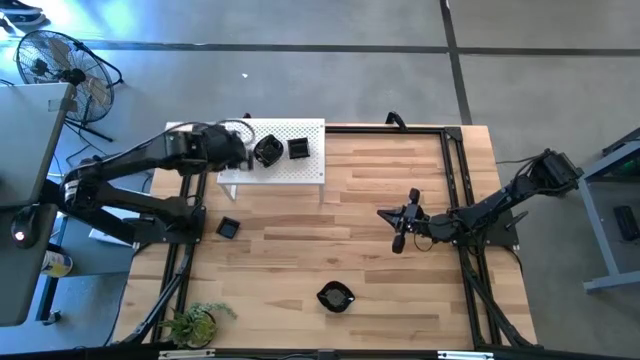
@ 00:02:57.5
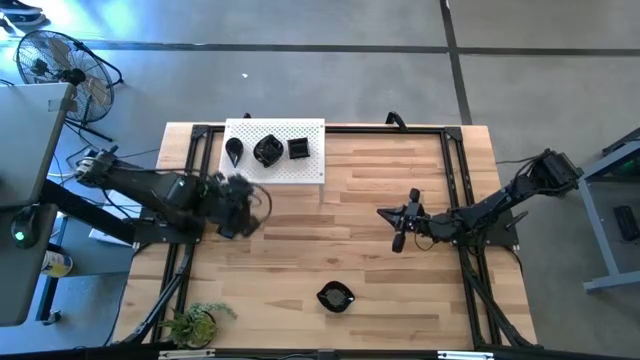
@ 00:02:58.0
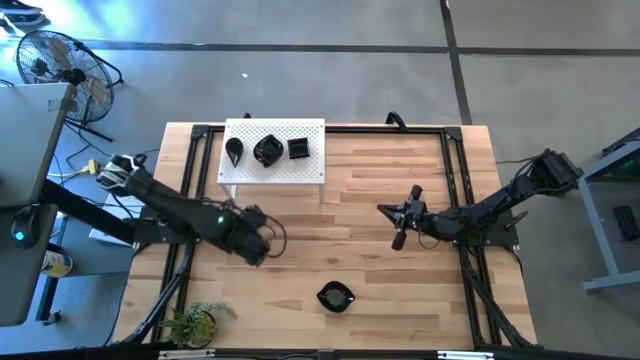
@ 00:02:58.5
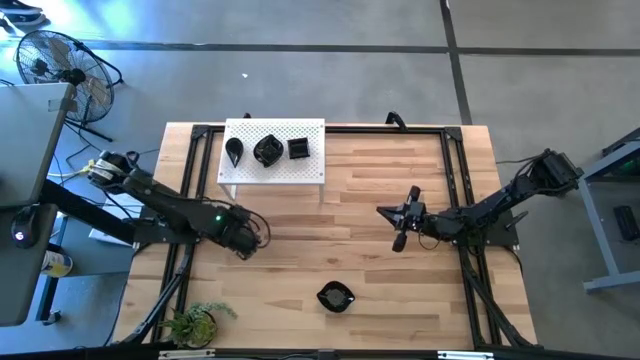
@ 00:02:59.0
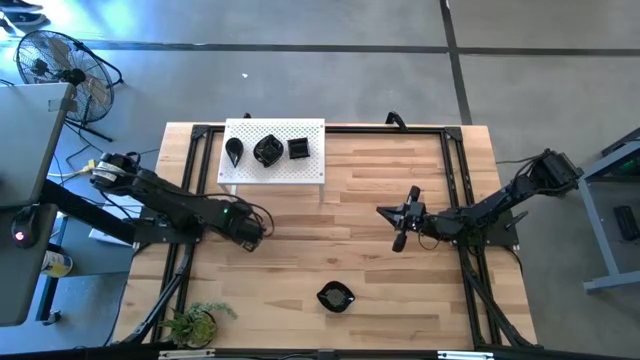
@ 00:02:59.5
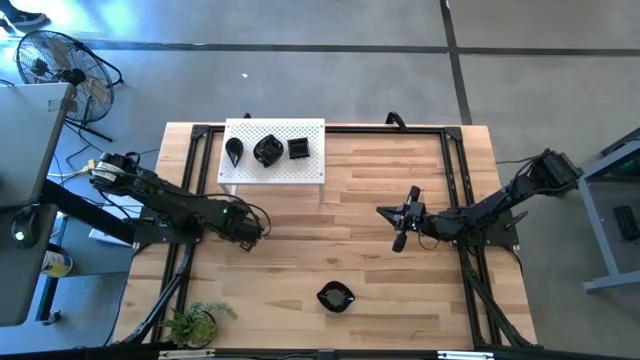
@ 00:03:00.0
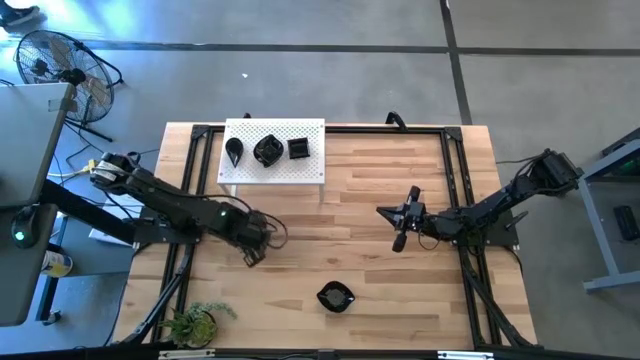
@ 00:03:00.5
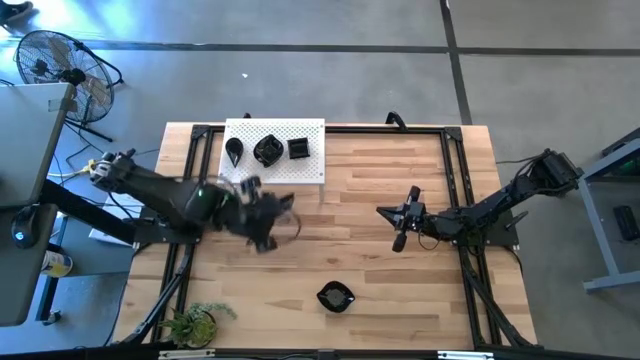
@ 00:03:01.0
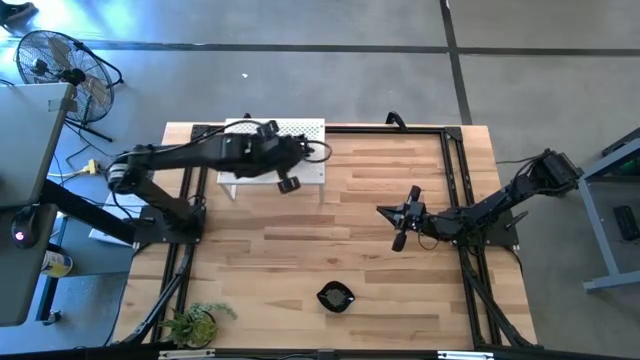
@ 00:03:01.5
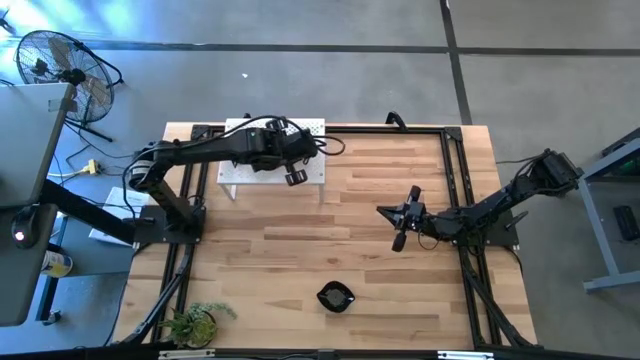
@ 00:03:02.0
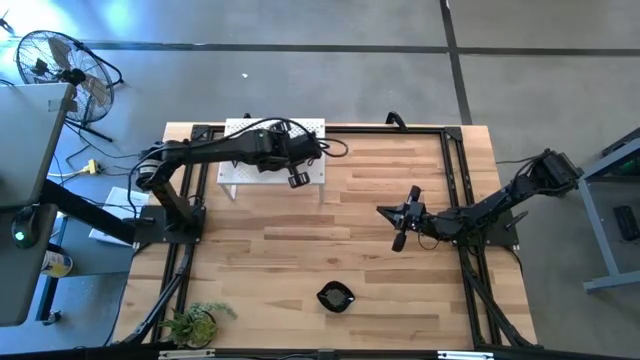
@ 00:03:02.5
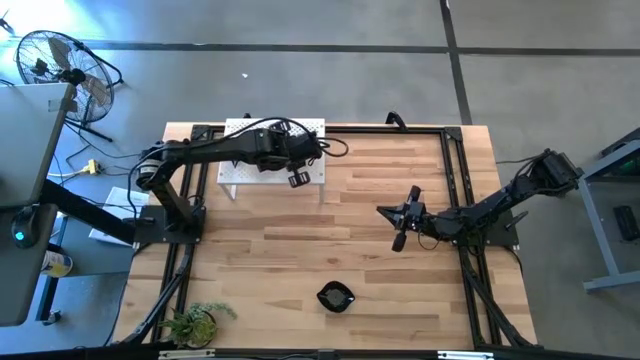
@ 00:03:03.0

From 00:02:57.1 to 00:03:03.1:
Task: Pick & Place Mini shaped plates
Stack the square plate on top of the square plate on the shelf

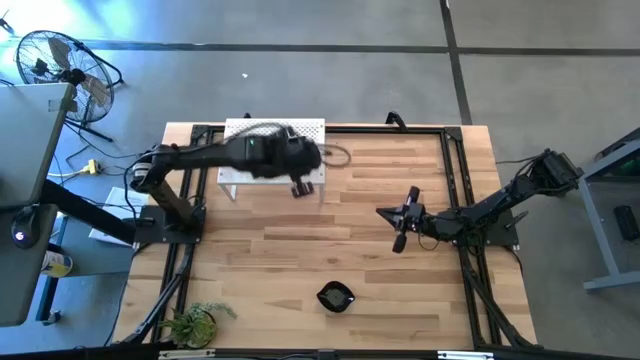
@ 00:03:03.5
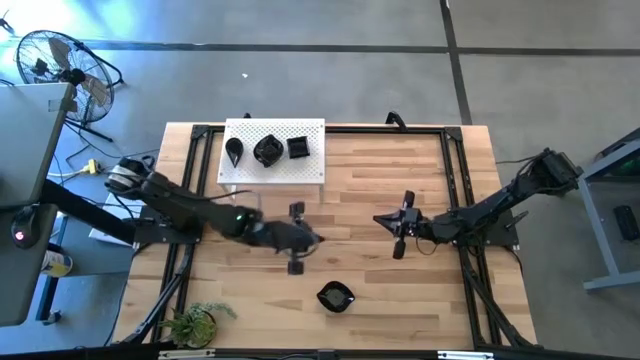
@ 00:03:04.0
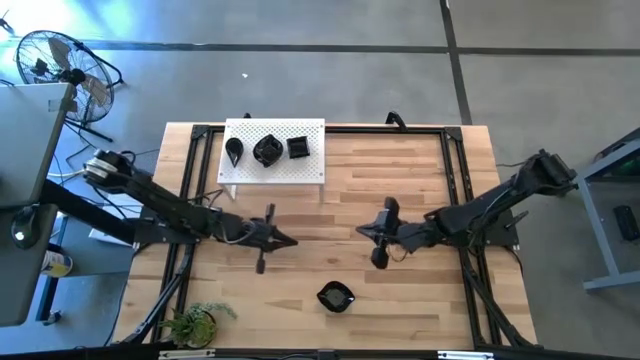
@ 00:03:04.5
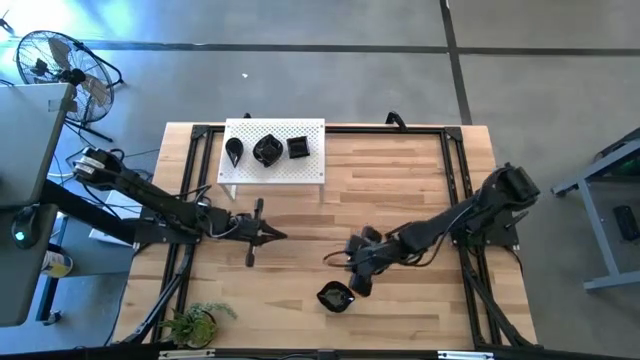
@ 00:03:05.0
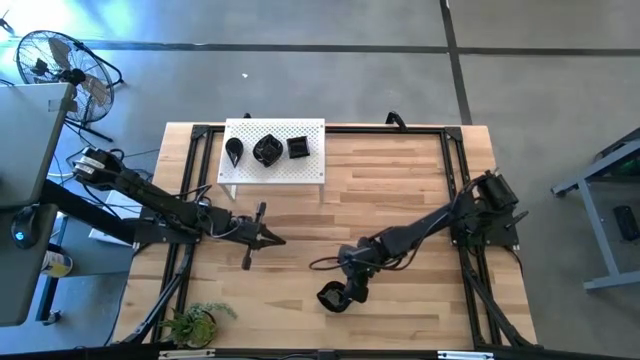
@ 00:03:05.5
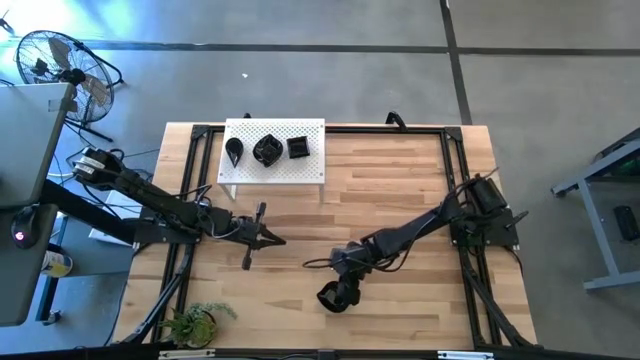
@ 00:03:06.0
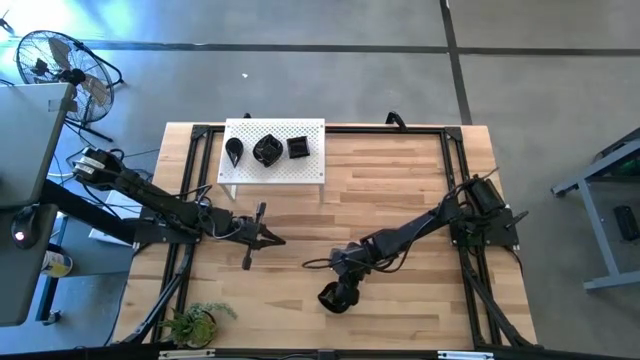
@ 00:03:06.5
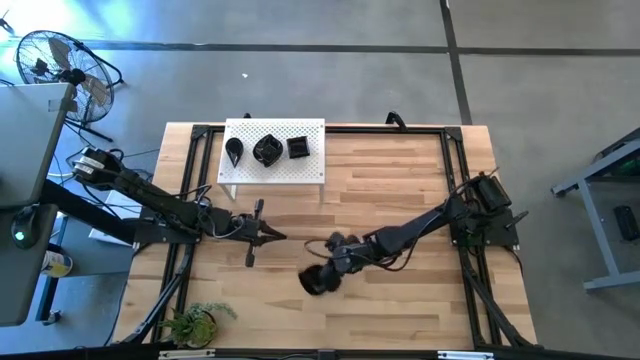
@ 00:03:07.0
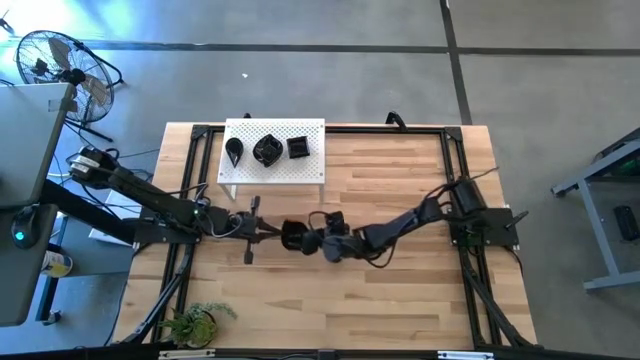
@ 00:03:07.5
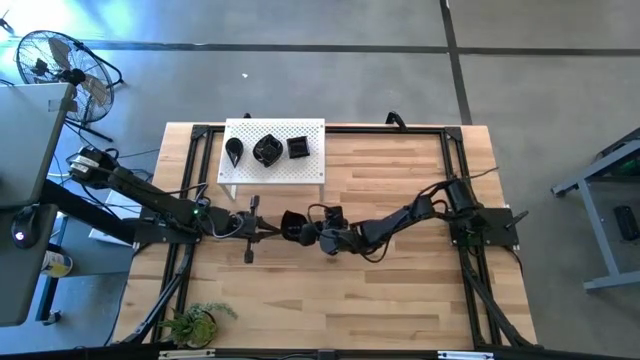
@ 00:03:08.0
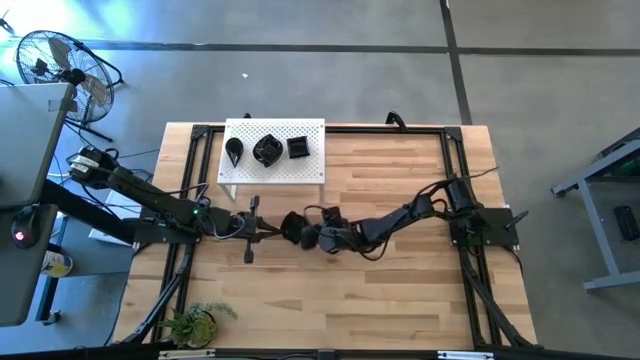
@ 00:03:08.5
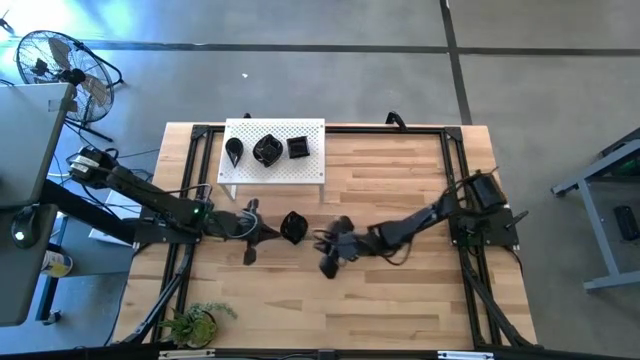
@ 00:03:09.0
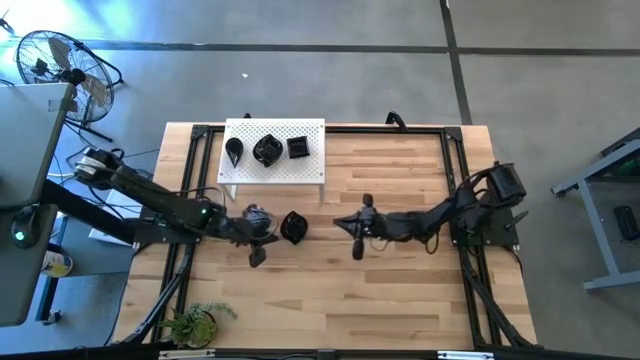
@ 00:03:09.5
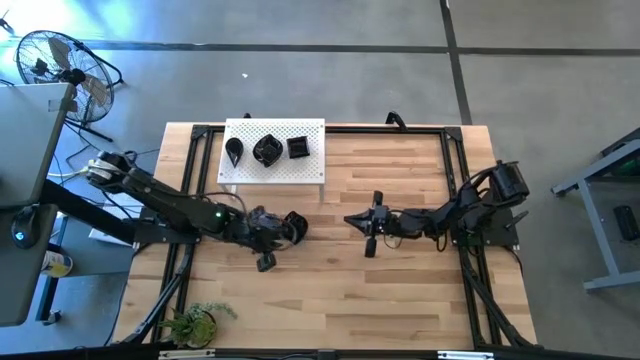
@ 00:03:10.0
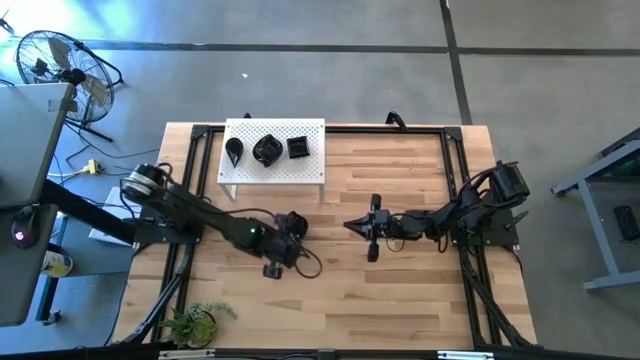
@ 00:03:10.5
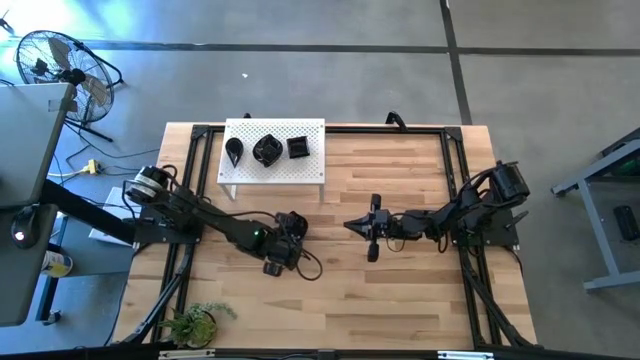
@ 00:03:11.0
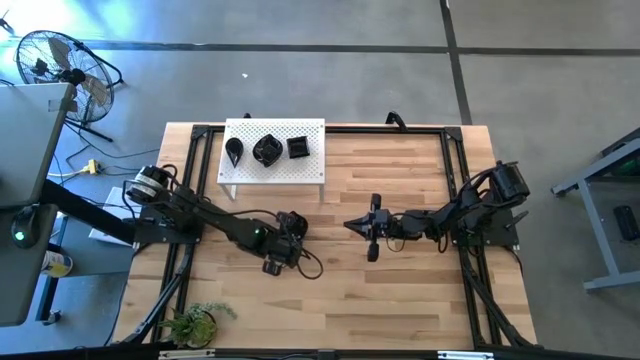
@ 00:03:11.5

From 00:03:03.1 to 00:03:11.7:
Stack the leaf-shaped plate on top of the leaf-shaped plate on the shelf

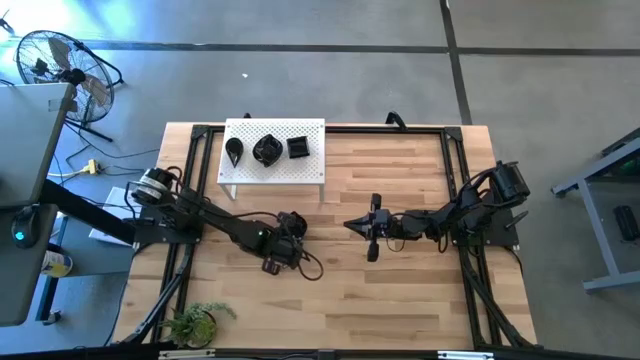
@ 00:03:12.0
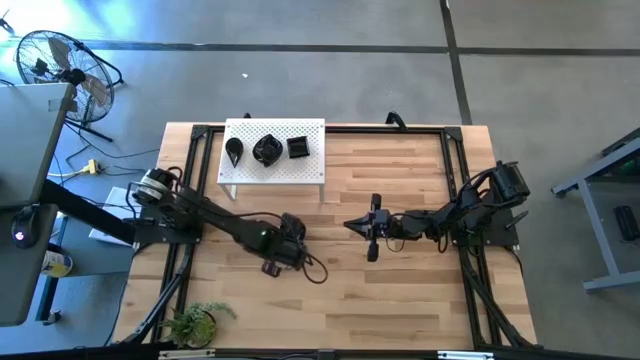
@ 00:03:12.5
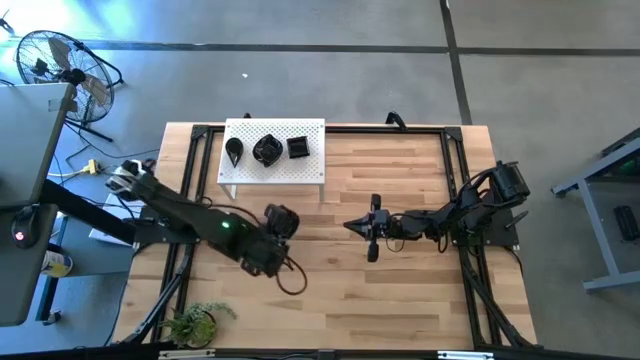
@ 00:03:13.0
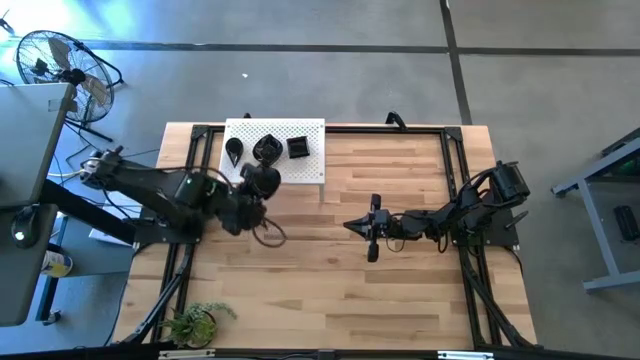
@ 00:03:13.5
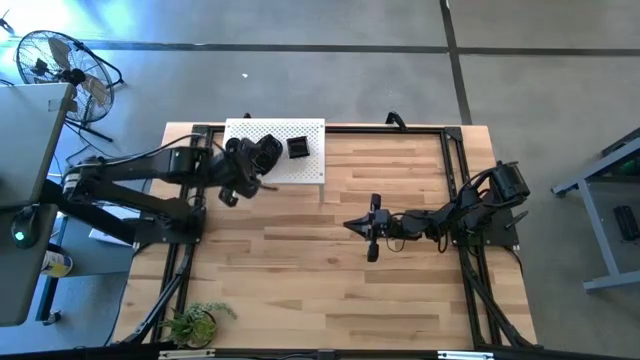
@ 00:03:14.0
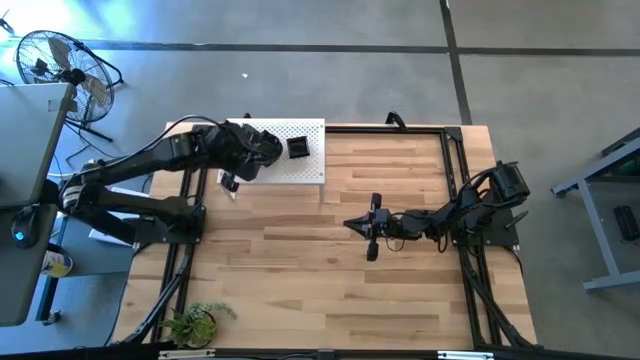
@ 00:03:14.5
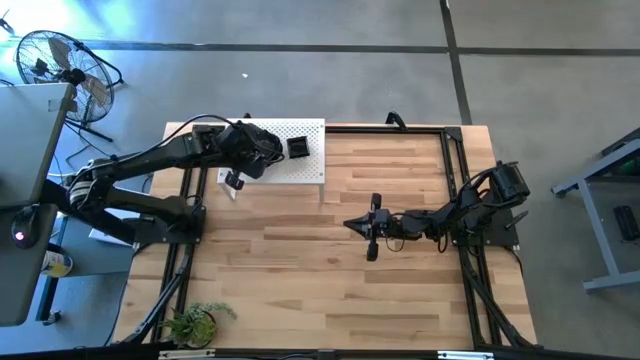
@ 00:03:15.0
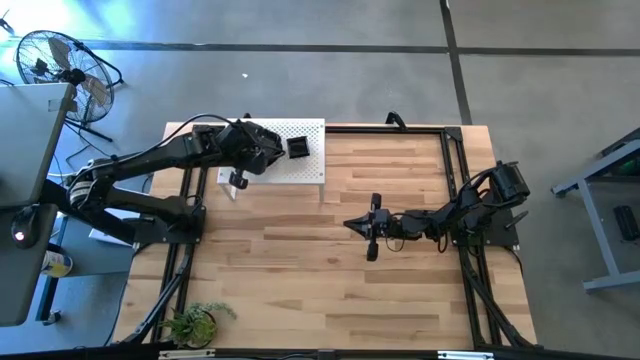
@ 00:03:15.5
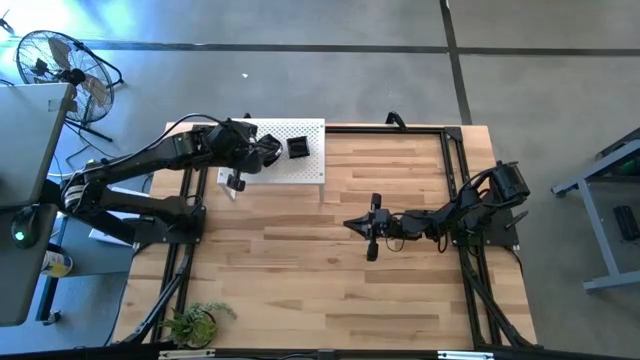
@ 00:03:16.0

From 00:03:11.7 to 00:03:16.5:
Stack the leaf-shaped plate on top of the leaf-shaped plate on the shelf

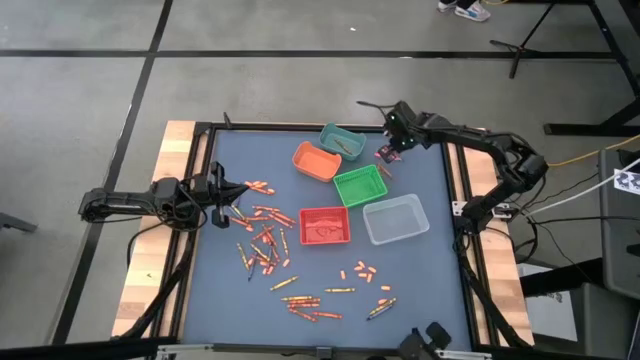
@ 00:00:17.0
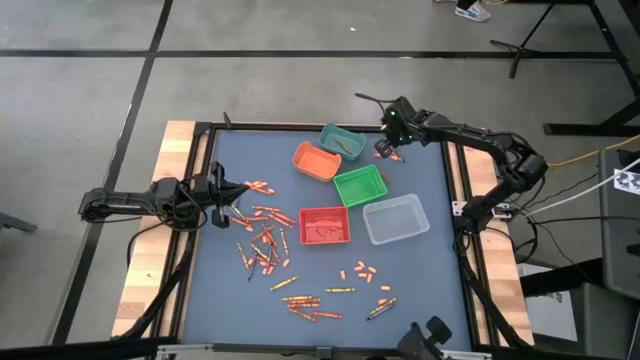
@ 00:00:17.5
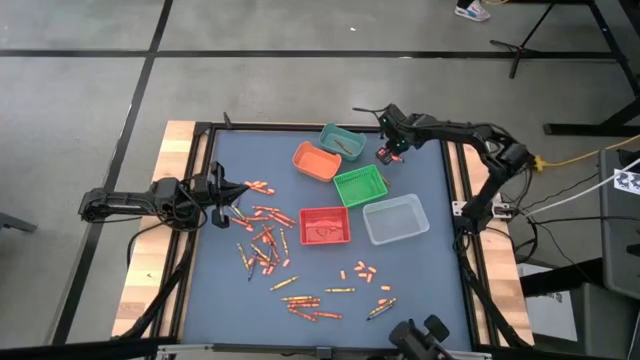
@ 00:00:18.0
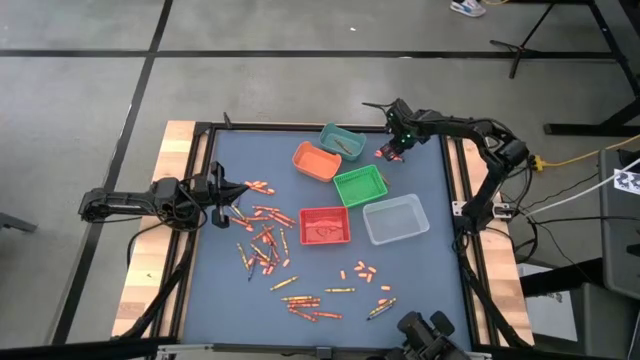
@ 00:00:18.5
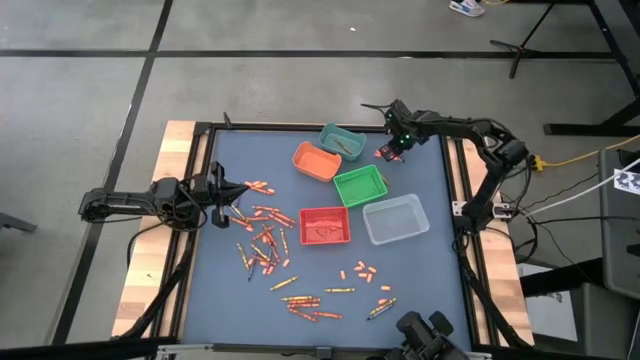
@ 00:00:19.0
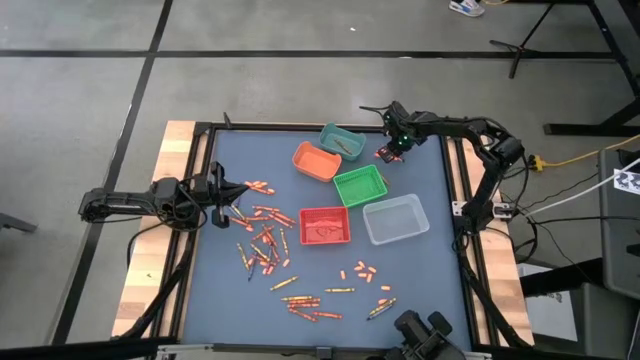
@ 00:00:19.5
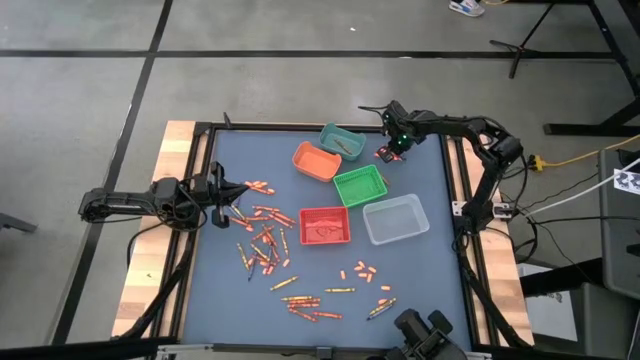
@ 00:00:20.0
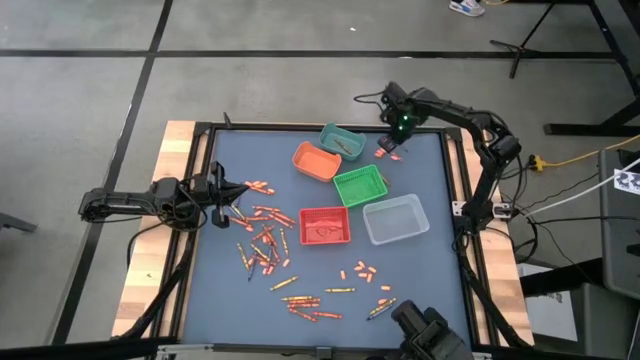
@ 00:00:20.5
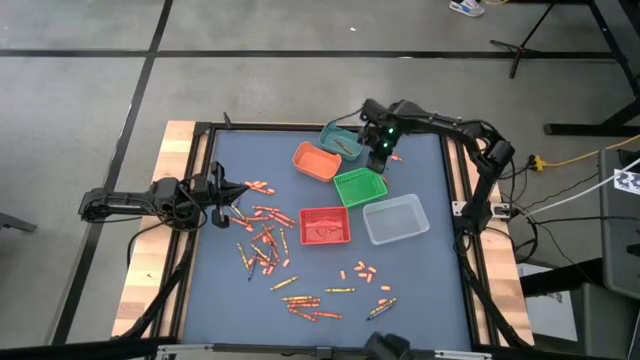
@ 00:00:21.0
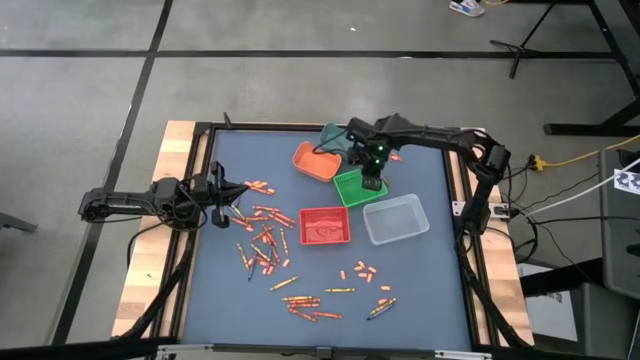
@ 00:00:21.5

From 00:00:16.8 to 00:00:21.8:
Task: Sort crayons
Put the blue crayon into the green bin
